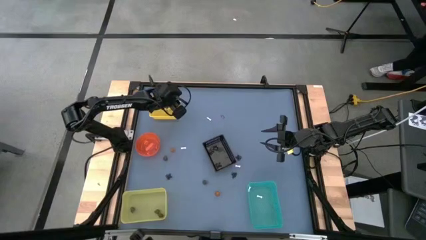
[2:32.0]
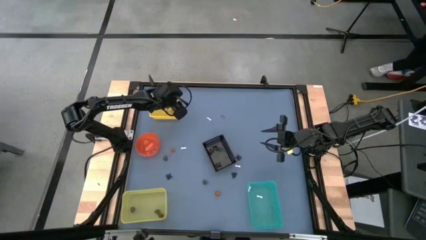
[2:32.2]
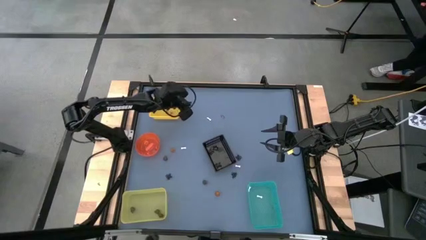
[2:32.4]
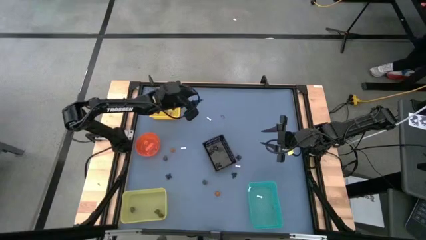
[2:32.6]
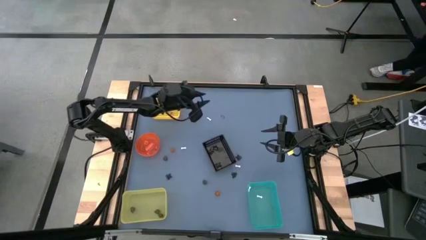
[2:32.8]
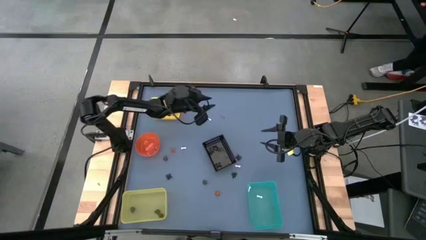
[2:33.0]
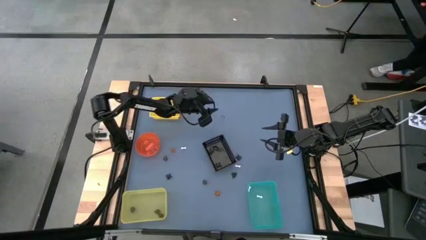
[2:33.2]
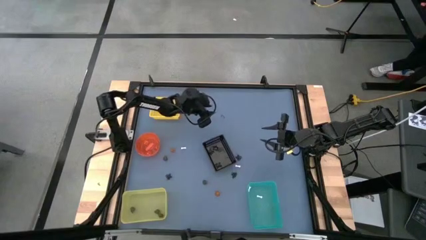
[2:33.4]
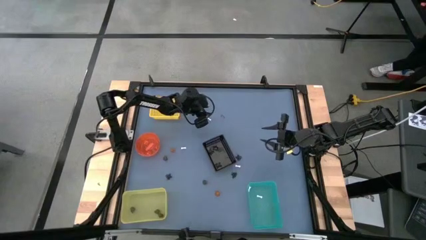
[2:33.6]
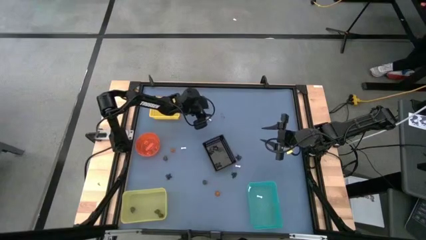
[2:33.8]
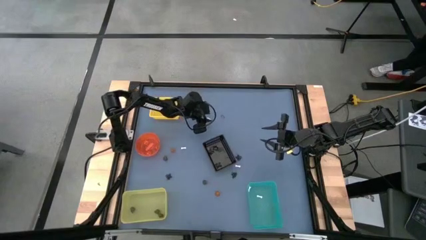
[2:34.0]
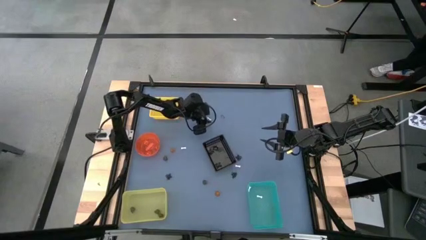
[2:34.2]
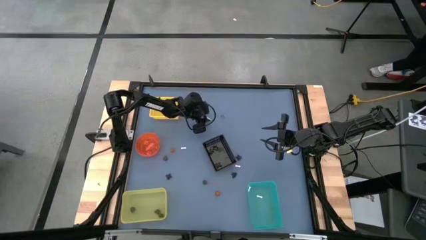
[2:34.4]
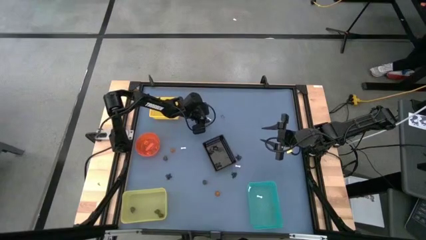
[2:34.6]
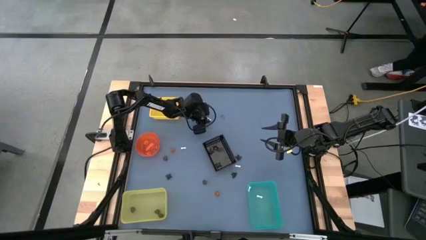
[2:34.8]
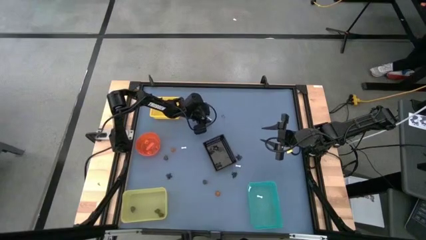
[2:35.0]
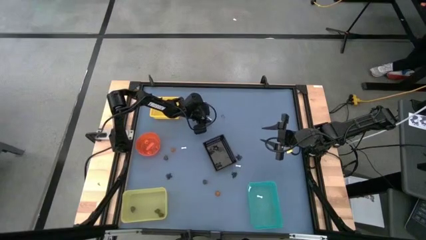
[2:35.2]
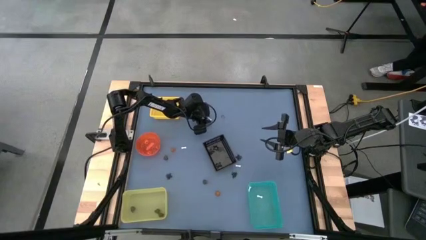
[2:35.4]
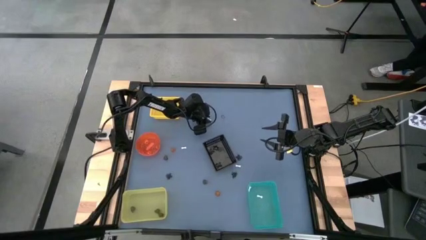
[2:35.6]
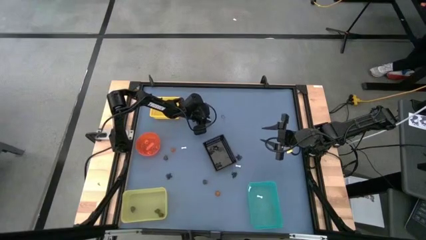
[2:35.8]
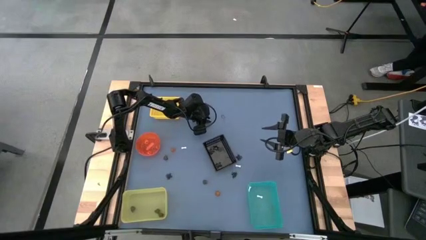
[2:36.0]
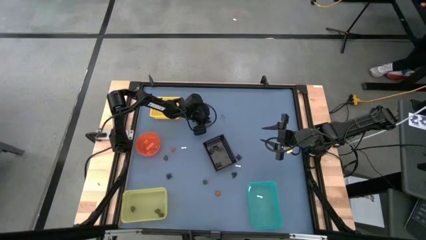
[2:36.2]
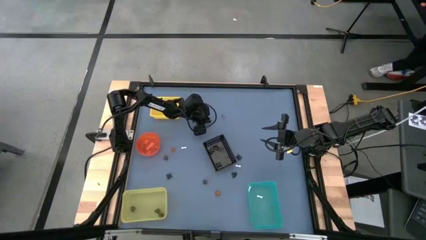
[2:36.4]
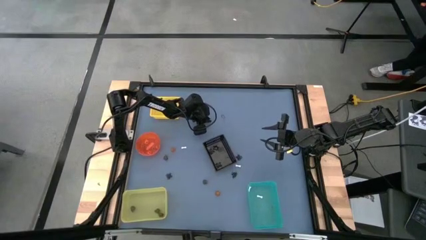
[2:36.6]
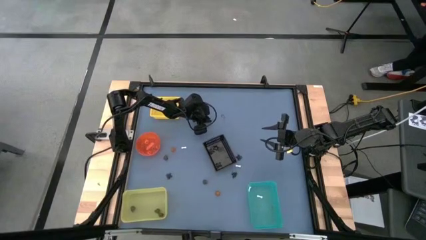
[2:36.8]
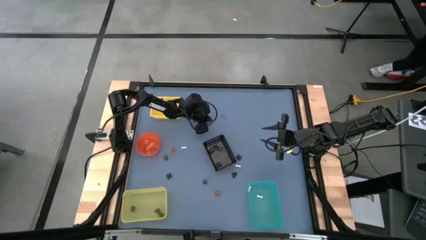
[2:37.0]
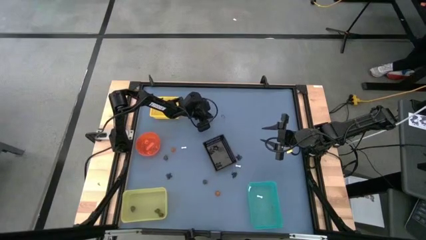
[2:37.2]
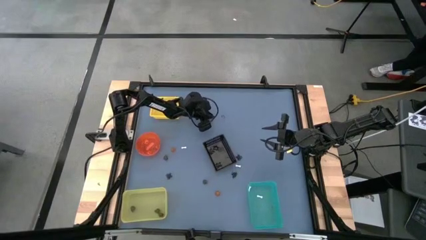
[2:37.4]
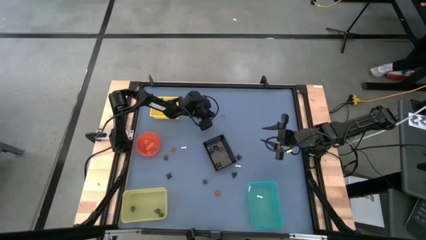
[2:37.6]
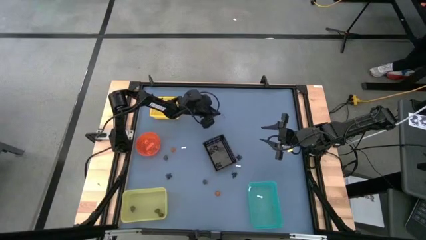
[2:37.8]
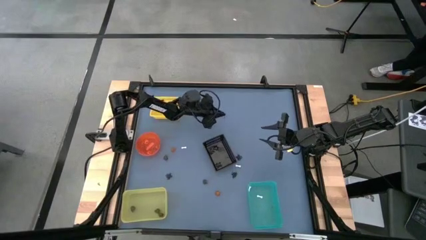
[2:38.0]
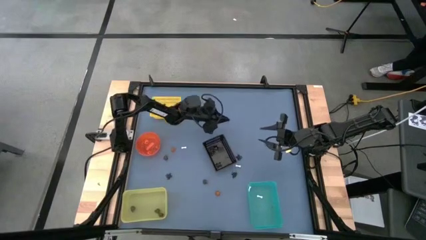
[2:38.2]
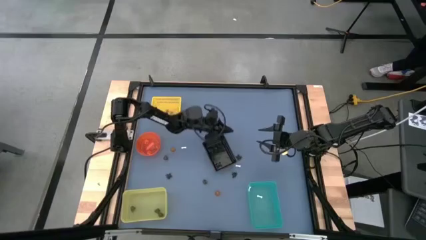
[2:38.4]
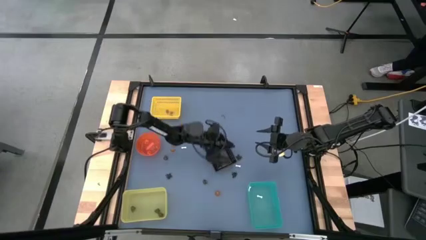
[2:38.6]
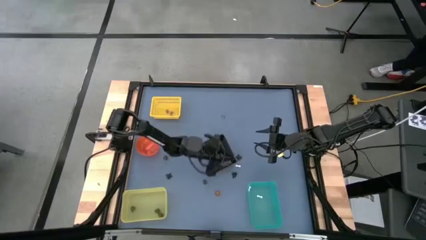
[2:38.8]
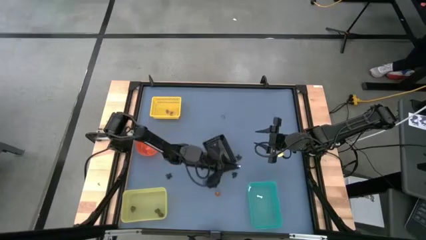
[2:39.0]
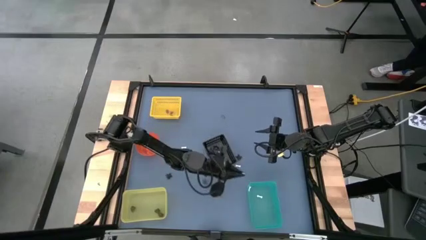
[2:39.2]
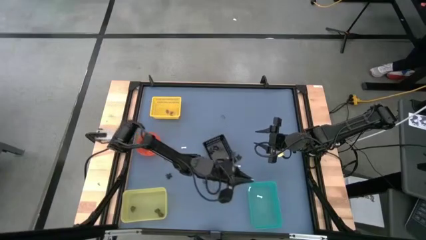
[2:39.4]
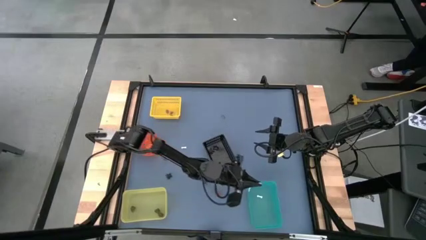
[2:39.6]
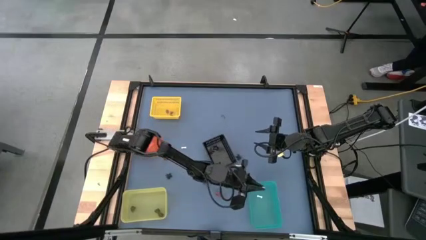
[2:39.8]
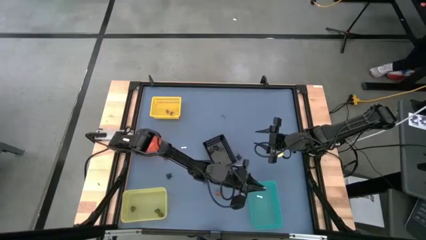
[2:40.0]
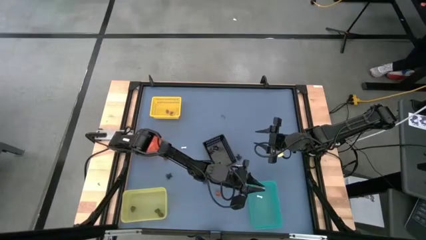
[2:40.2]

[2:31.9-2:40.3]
Task: Sort Halloween decoration
Put the white bone toy into the green bin

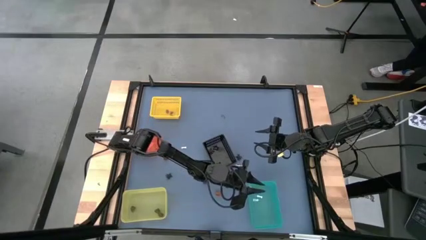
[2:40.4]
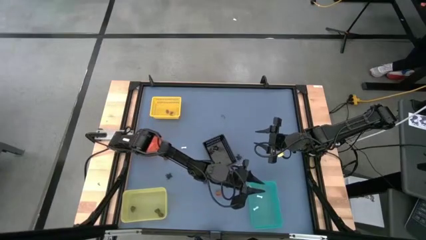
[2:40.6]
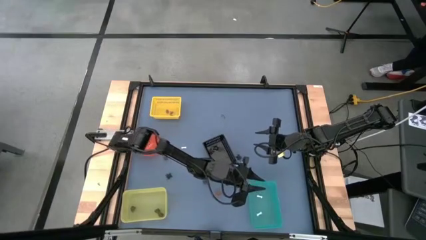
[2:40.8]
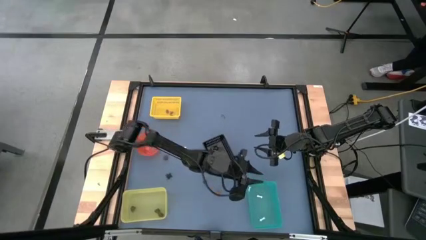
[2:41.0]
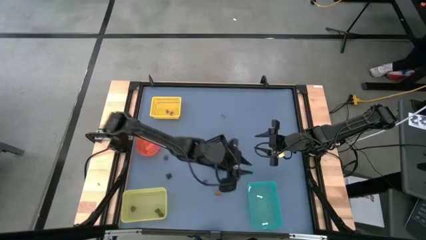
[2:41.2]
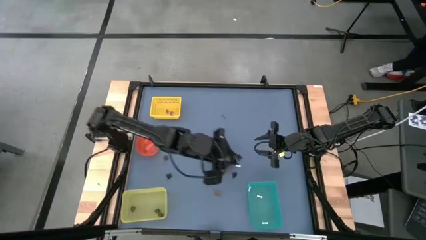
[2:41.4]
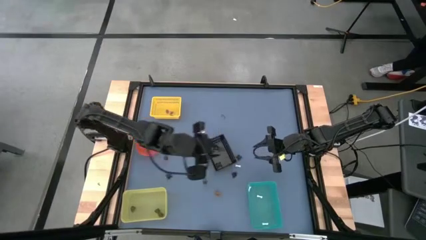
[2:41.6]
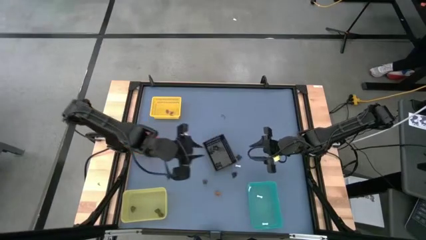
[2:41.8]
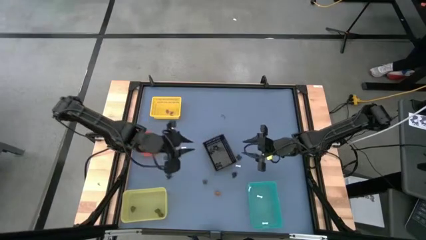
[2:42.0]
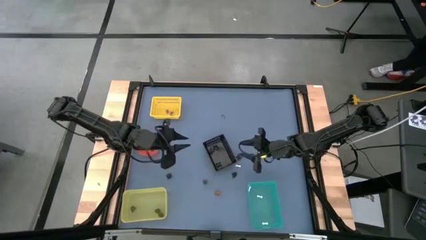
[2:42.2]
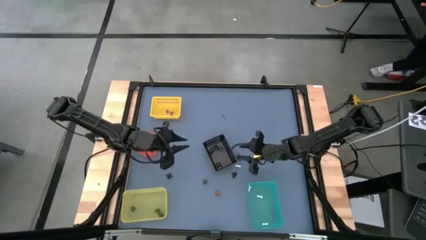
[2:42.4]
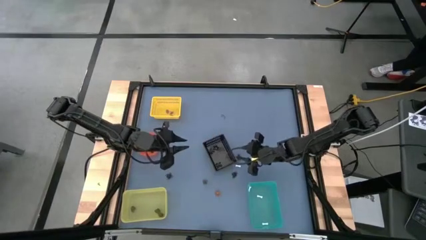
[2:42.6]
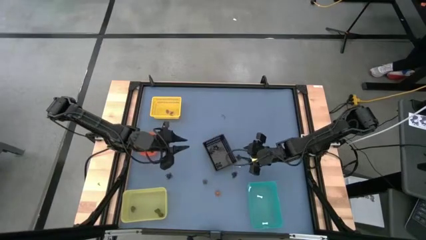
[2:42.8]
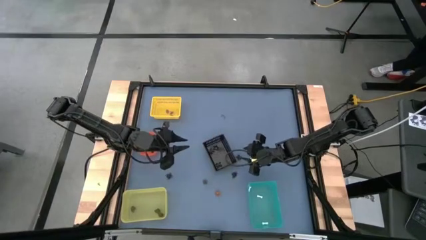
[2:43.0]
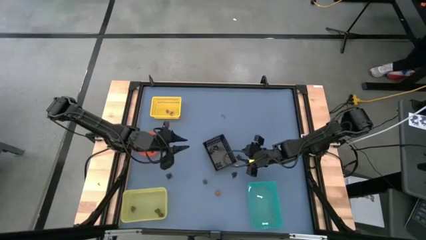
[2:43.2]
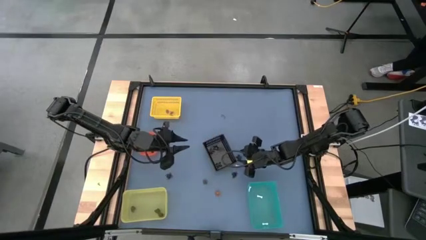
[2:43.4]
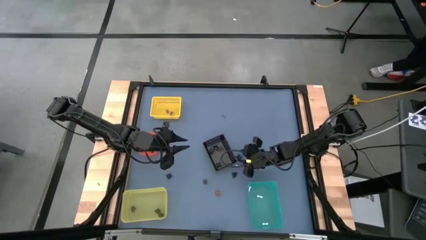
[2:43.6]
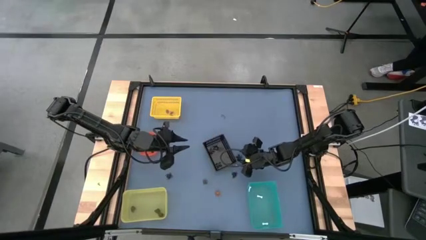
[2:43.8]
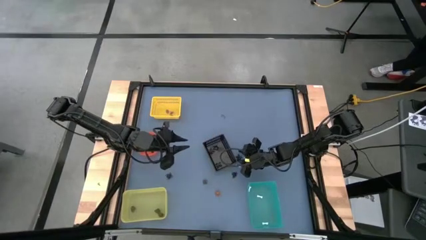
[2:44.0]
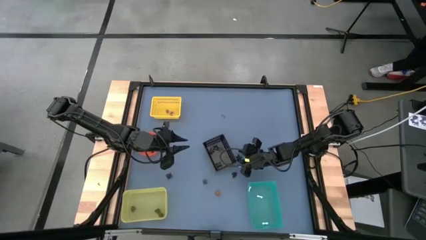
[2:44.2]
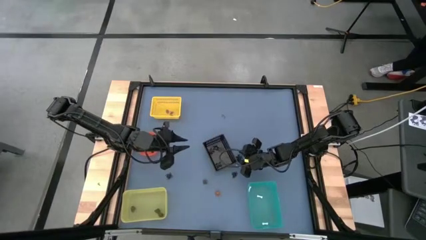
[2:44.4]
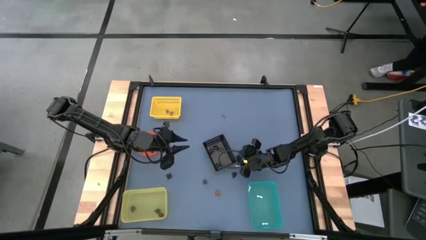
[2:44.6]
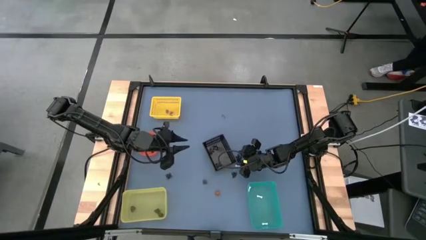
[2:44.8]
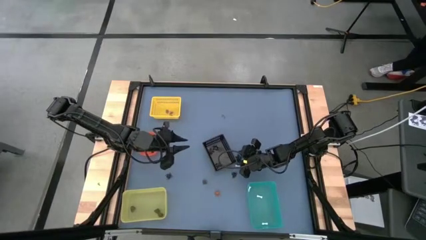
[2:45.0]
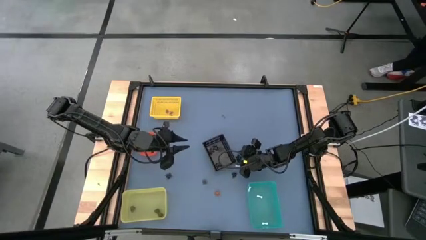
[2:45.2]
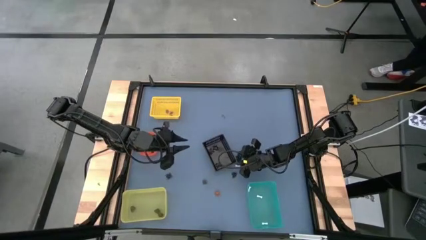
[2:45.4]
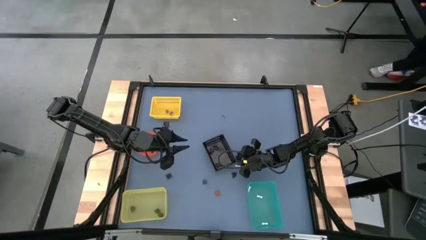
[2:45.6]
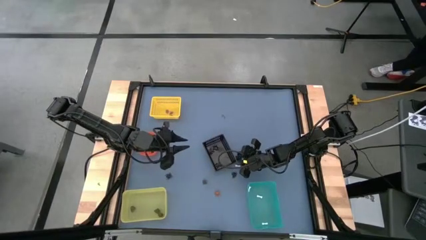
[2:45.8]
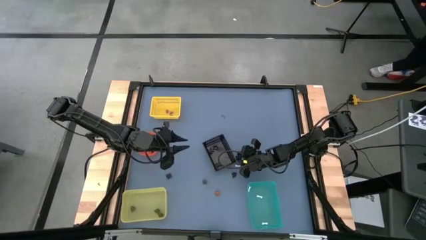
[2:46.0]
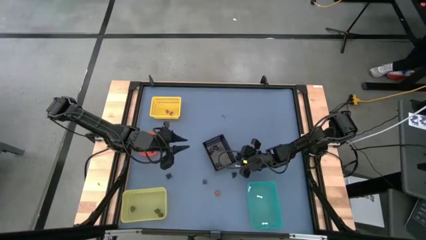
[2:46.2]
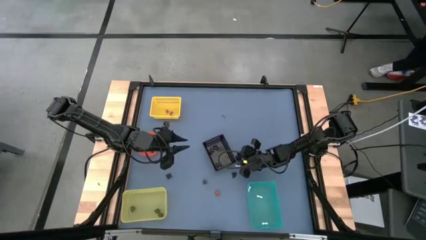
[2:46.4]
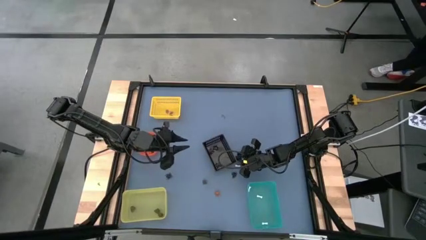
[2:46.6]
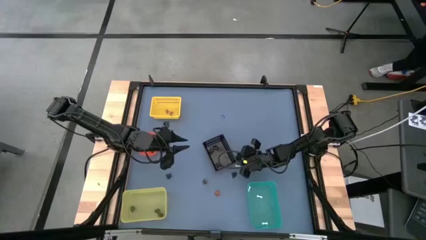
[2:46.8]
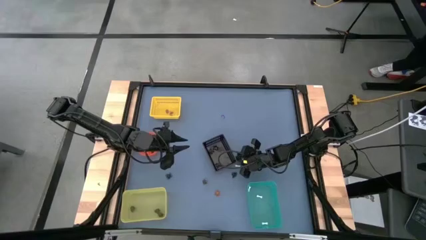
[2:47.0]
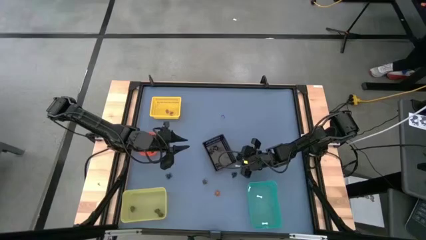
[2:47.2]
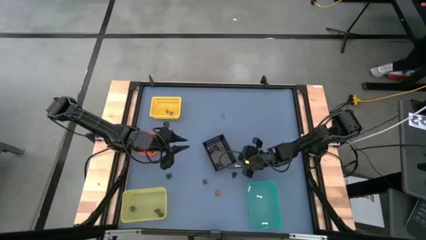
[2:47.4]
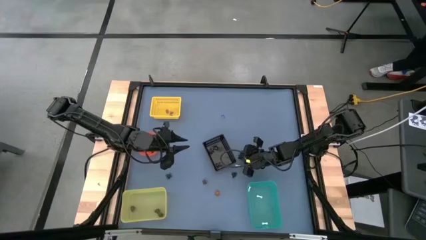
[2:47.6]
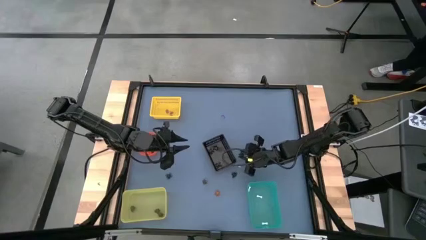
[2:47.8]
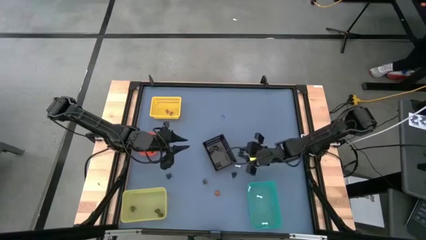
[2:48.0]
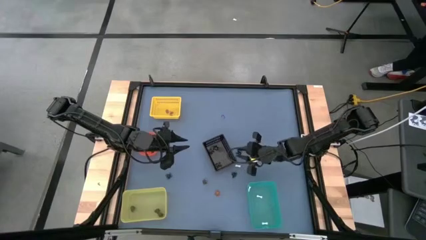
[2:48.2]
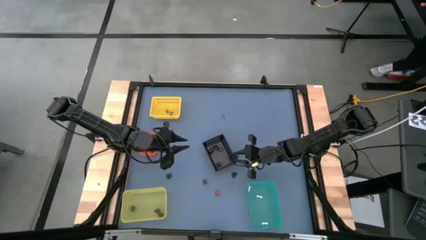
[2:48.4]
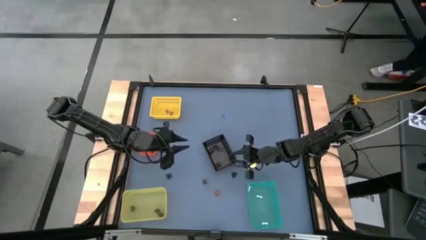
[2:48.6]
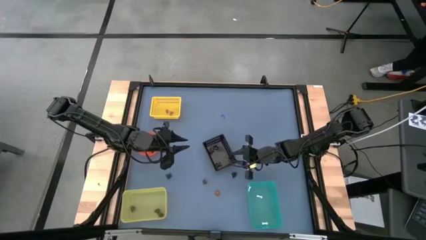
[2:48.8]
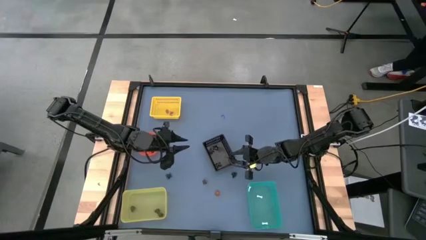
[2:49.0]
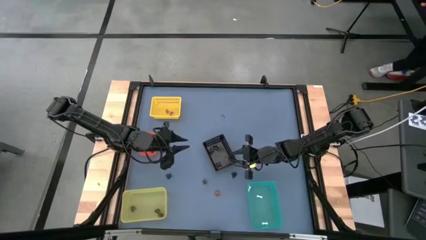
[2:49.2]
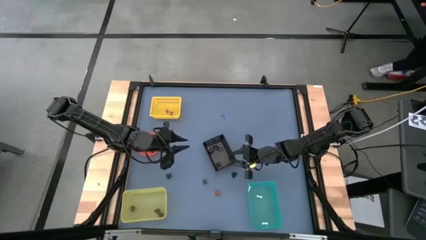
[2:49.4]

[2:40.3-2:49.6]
Put the black spider toy into the black bin
